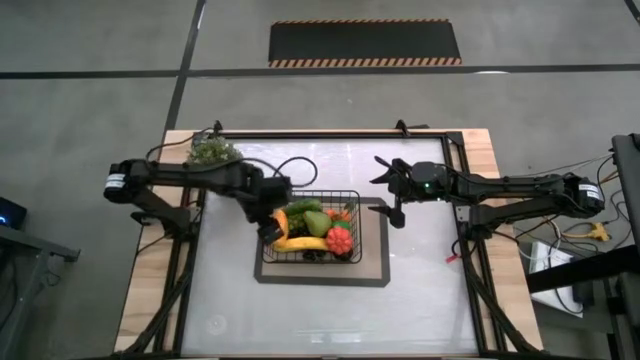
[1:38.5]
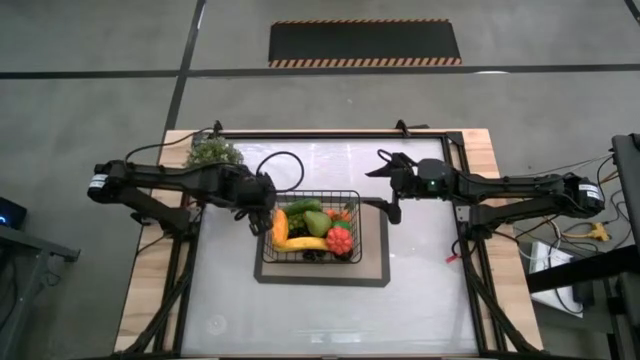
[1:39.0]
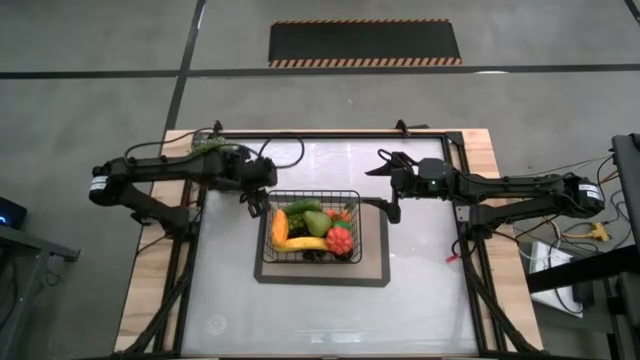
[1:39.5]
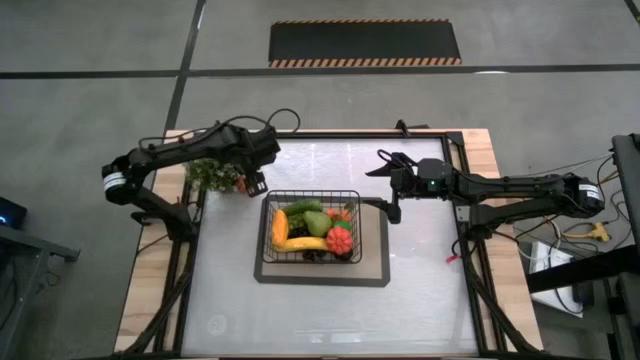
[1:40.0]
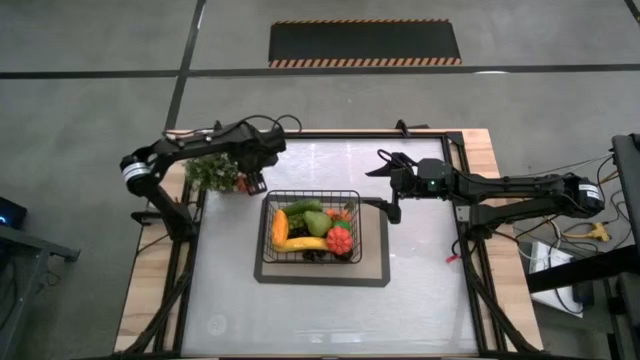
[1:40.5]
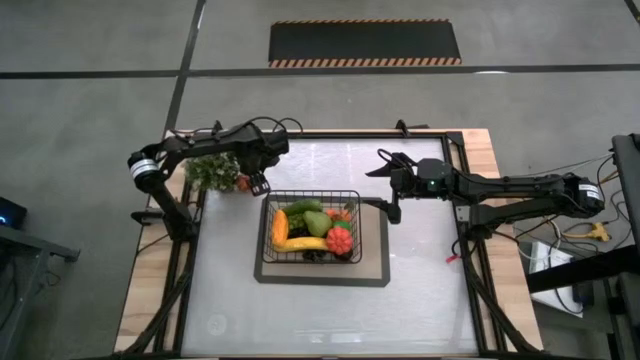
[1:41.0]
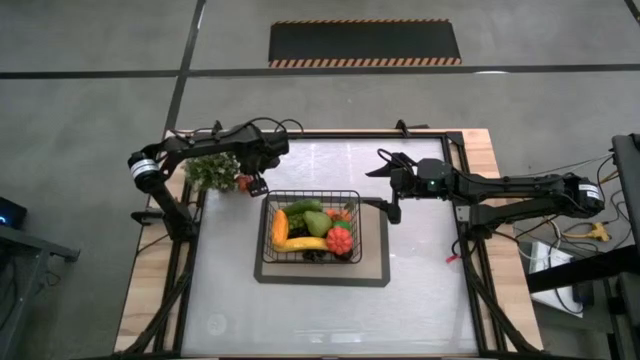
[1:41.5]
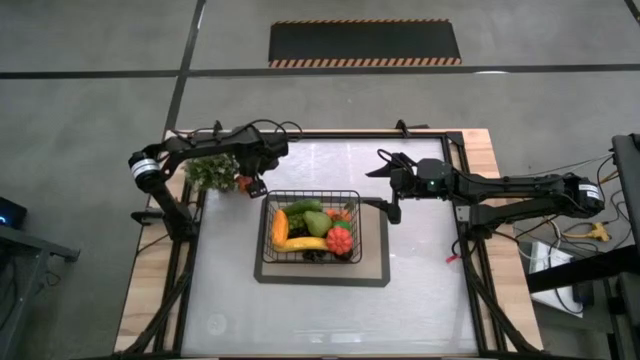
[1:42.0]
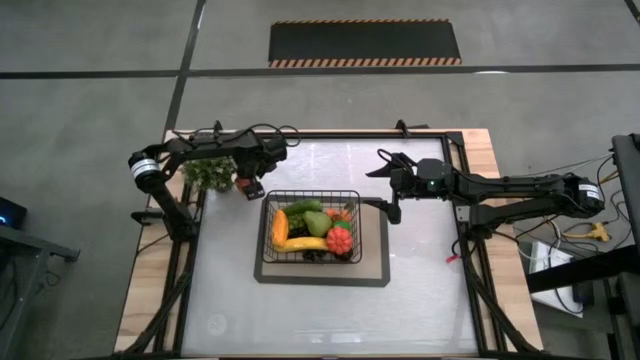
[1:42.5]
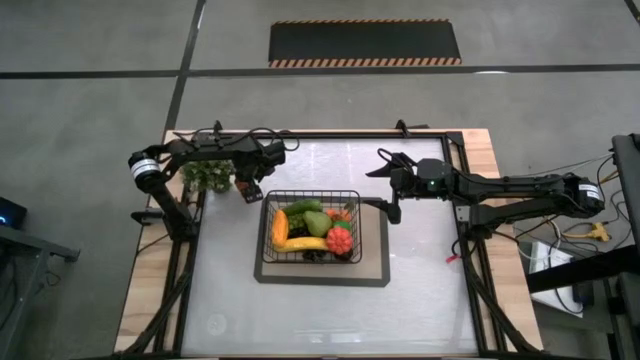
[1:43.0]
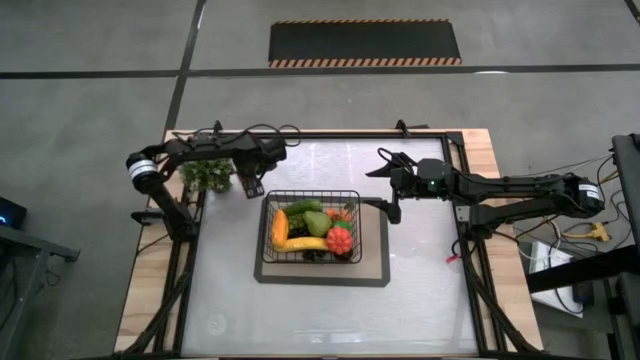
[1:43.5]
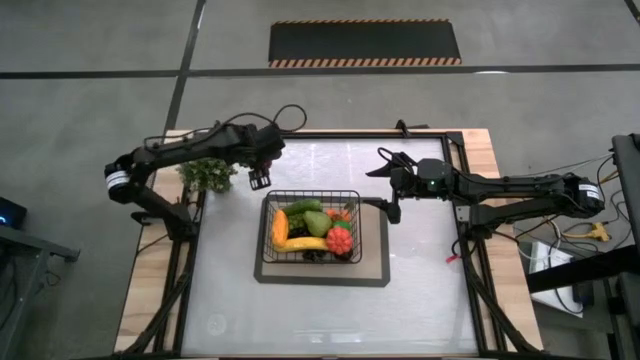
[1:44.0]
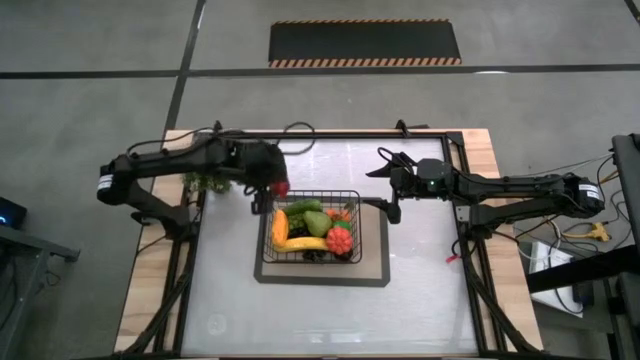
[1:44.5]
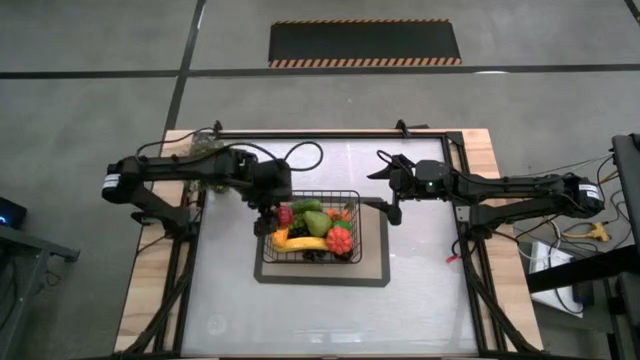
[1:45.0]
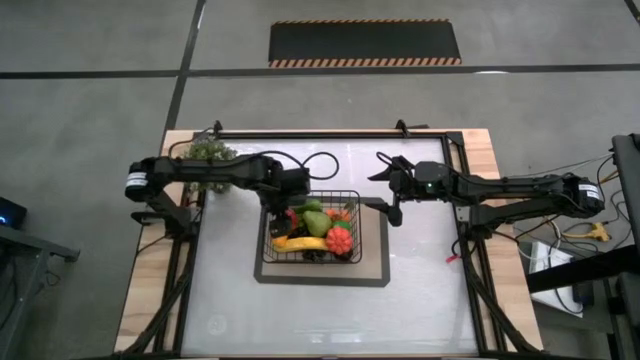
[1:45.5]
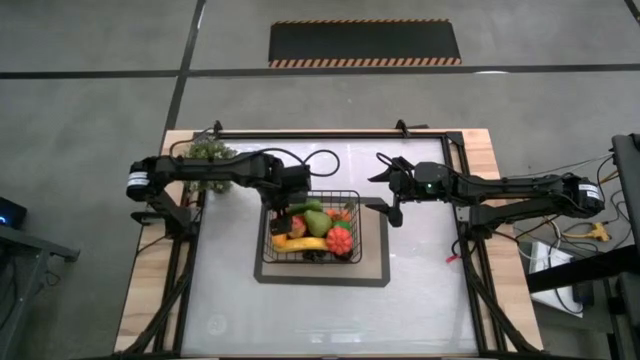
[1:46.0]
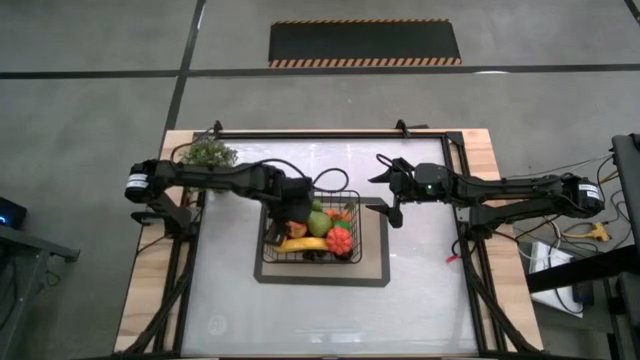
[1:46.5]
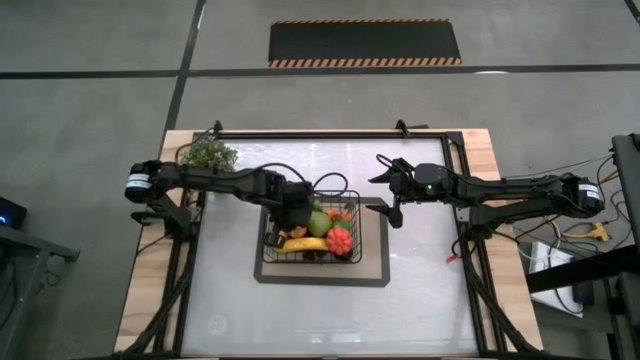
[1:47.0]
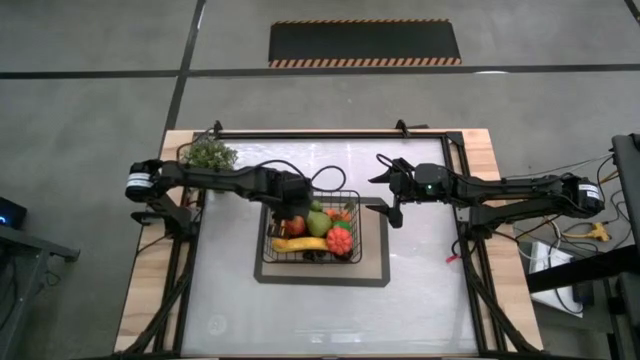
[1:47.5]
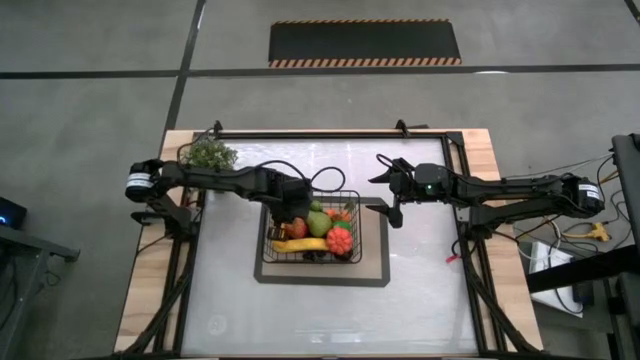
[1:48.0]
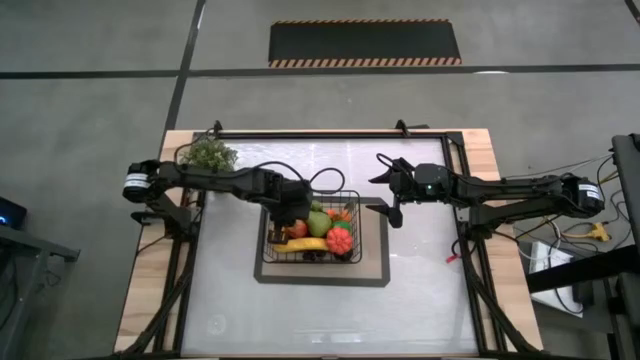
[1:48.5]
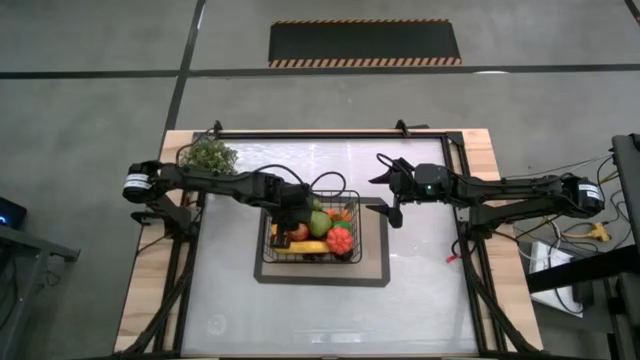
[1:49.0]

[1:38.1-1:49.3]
Task: Build produce basket
Put the red apple into the black wire basket

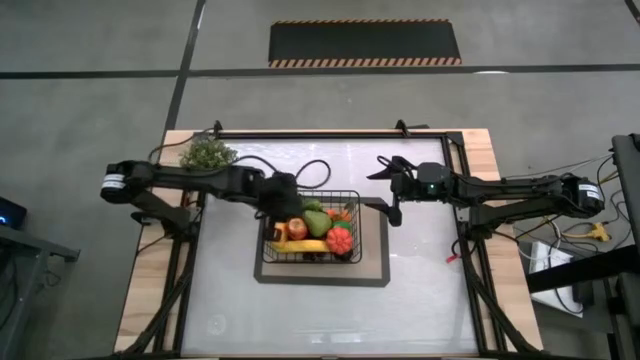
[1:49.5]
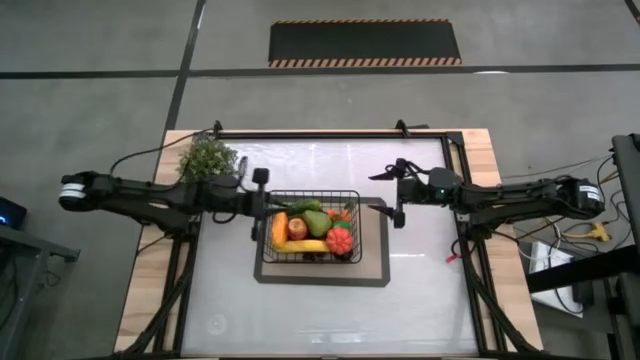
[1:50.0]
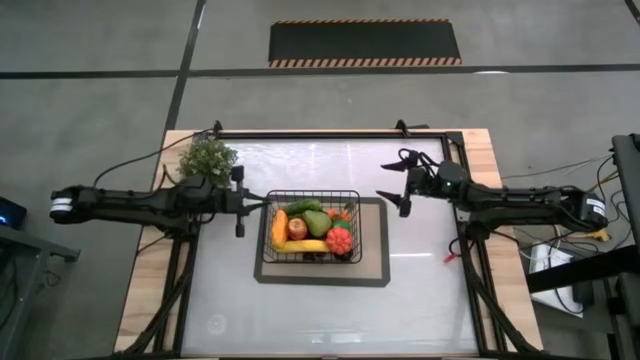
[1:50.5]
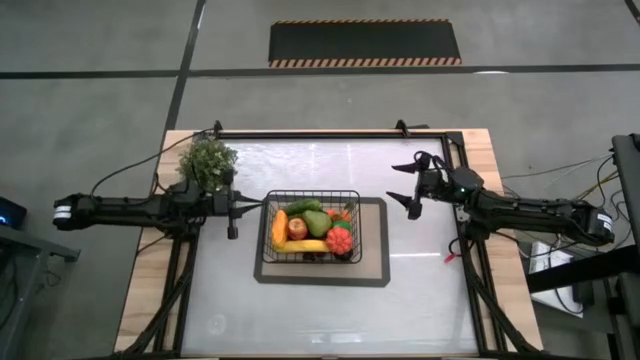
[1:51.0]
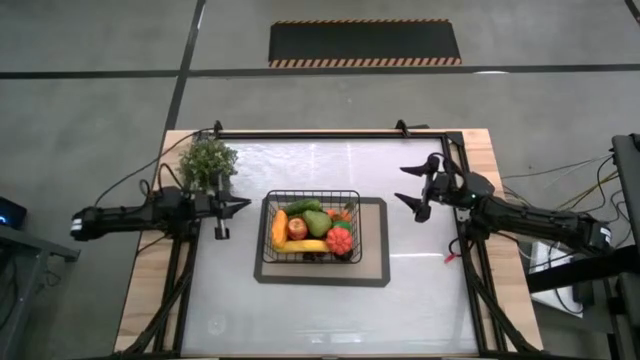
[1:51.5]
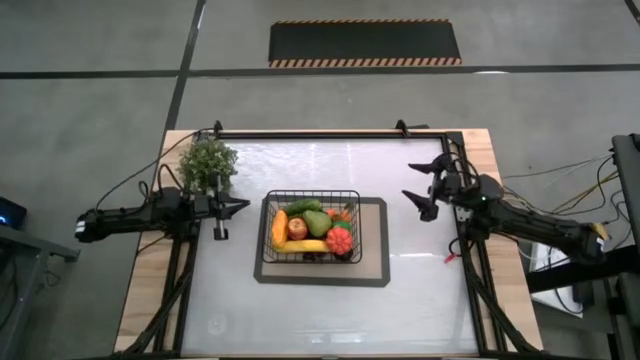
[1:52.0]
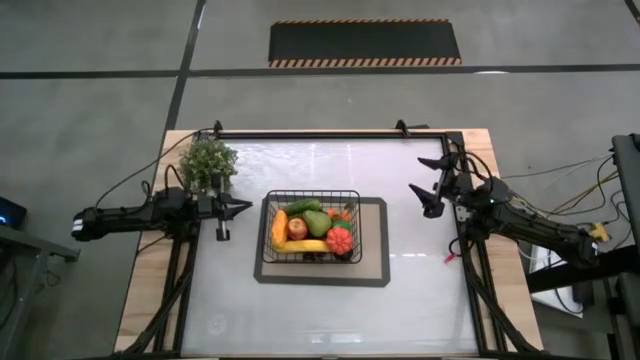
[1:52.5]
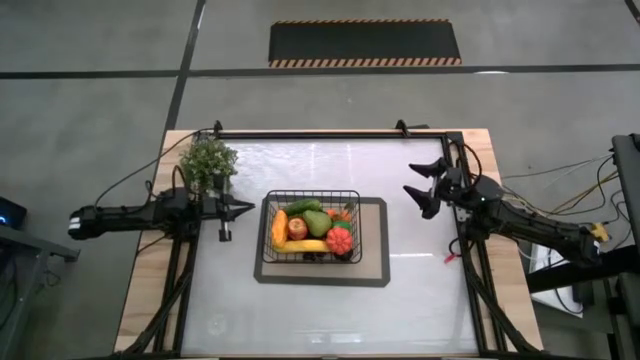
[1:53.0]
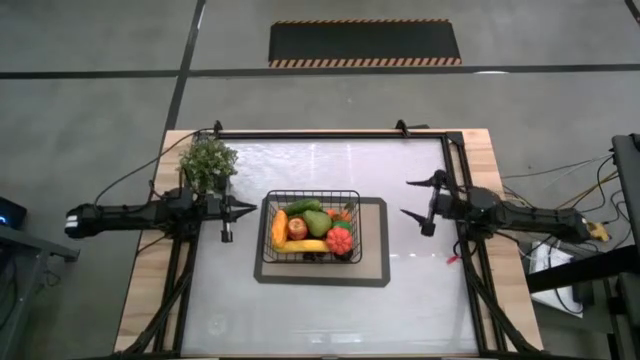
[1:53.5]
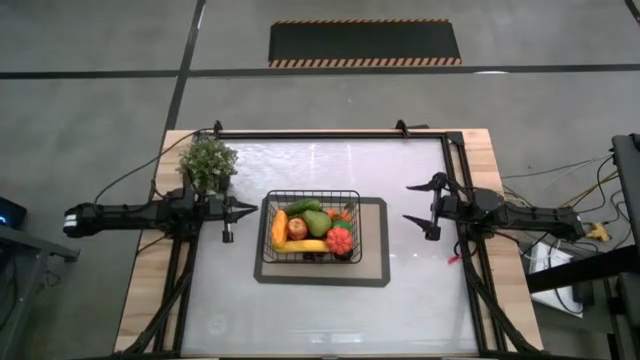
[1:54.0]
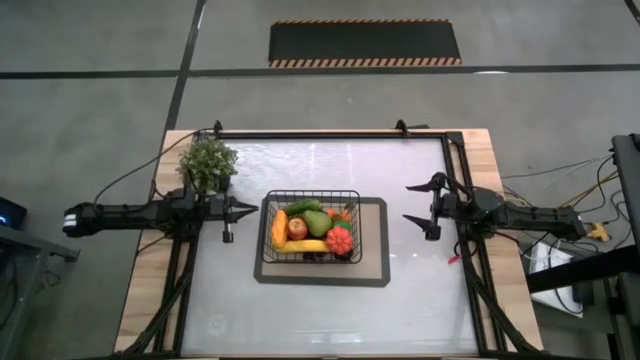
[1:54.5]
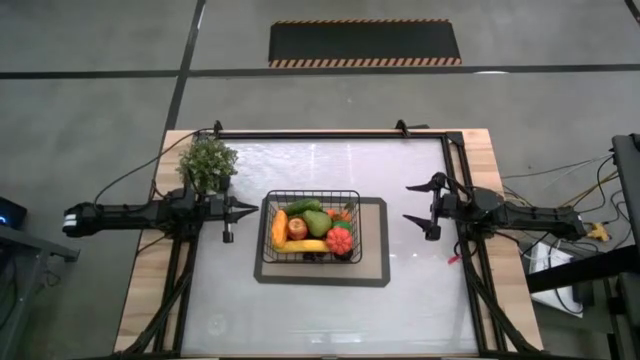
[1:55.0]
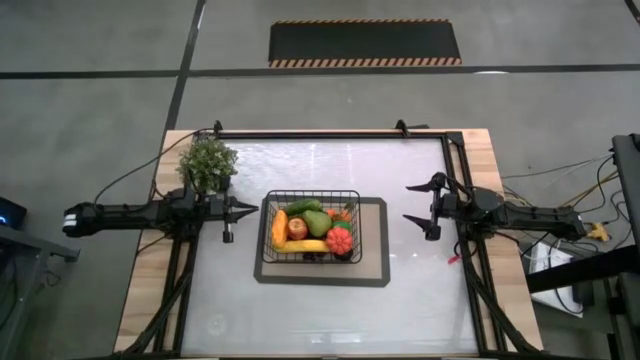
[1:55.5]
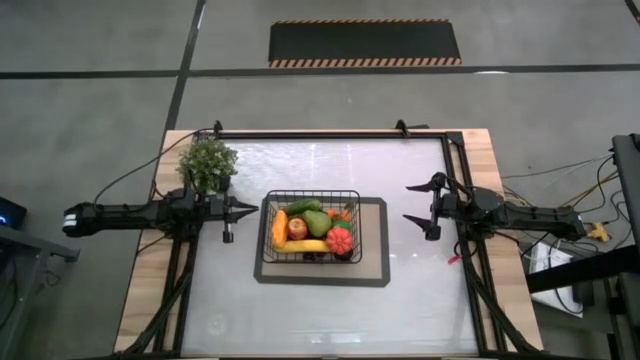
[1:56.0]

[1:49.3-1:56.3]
Return to Home Position

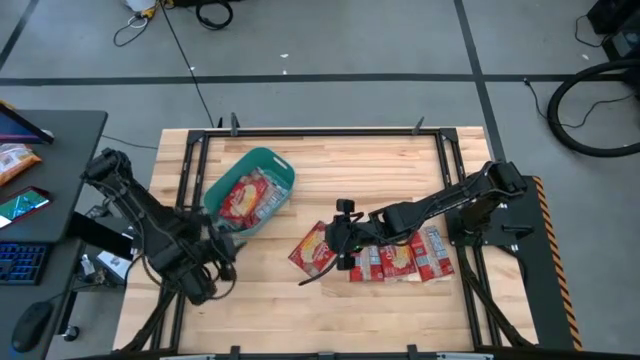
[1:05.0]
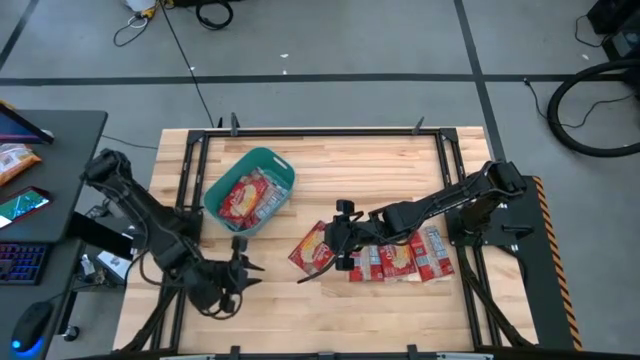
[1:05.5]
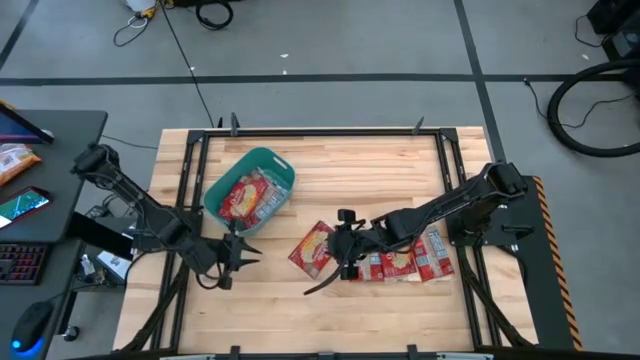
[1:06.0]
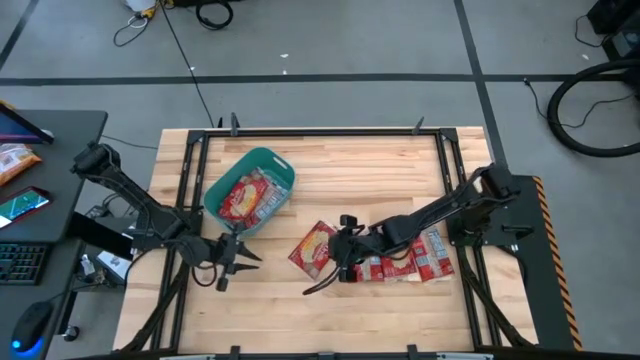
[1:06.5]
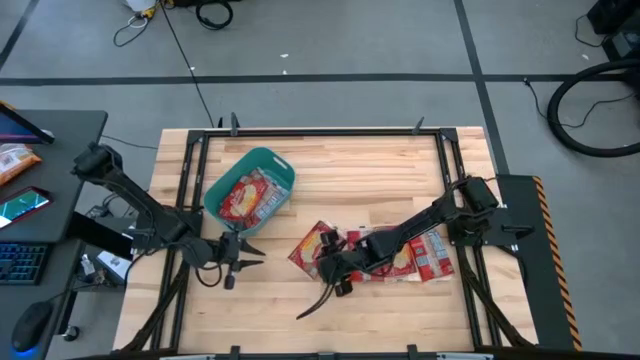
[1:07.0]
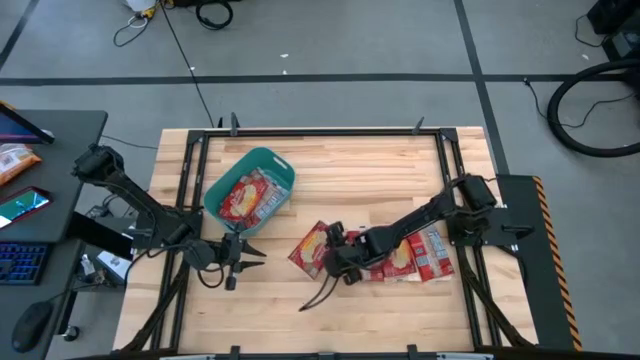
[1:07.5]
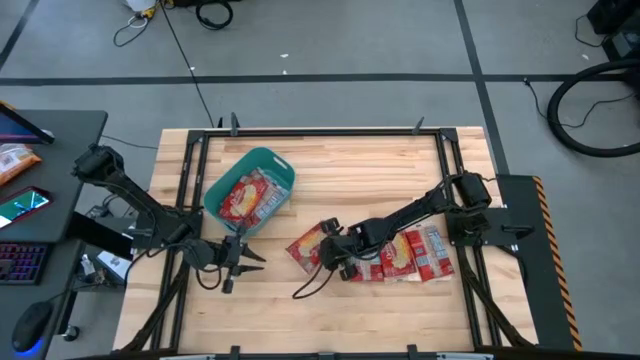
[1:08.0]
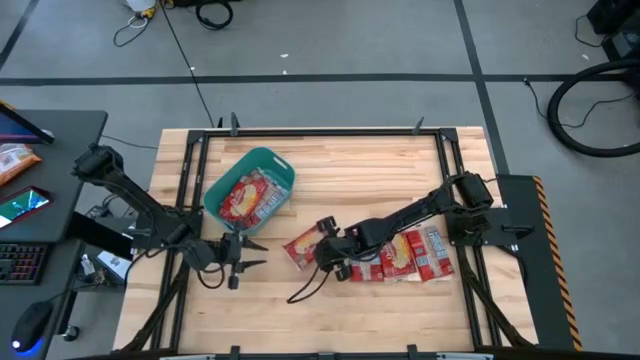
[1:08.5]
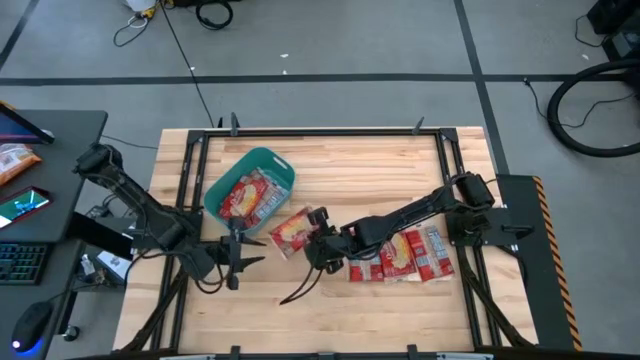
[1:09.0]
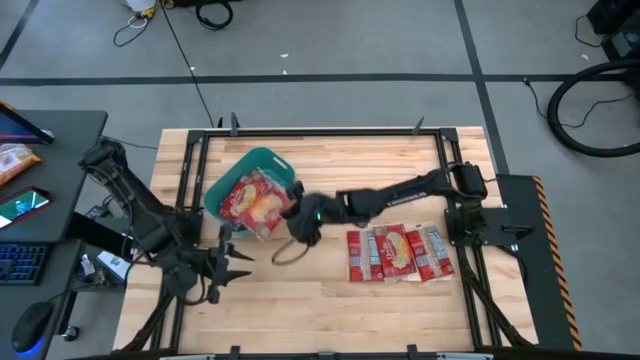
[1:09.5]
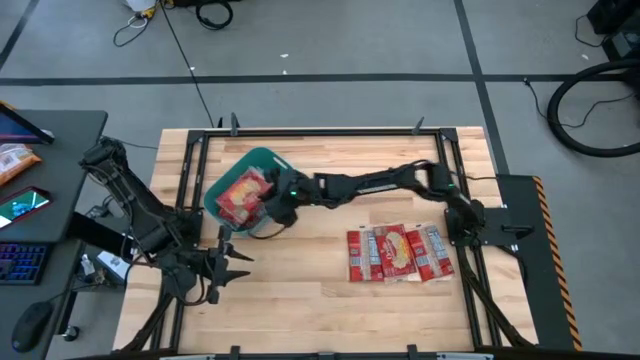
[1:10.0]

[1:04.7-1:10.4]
Task: Sort popcorn bags into baskets
Put the red popcorn bag into the green bin
